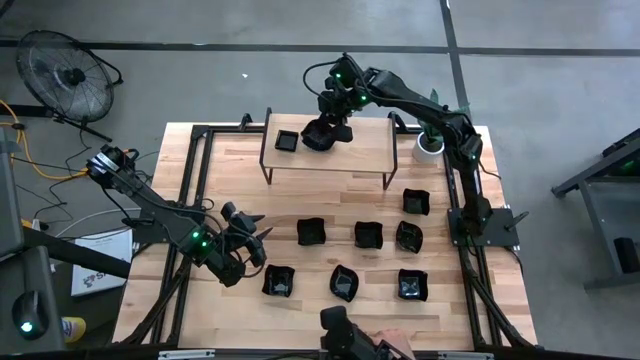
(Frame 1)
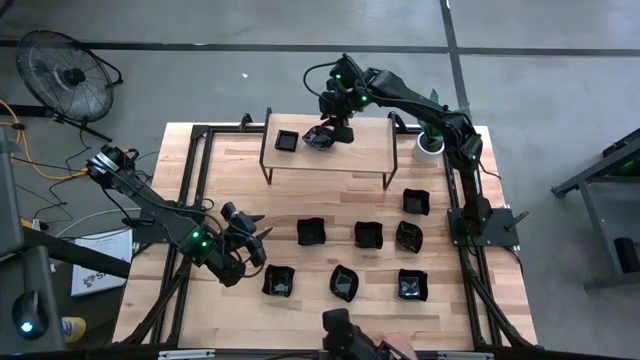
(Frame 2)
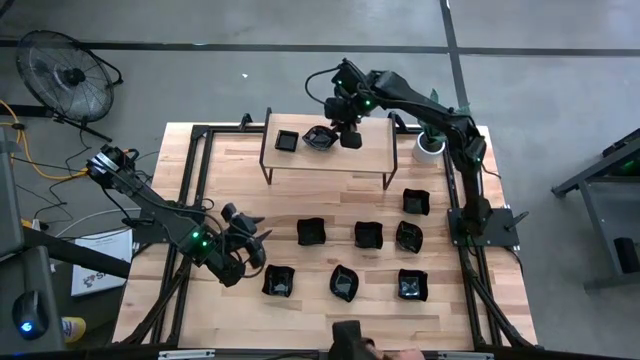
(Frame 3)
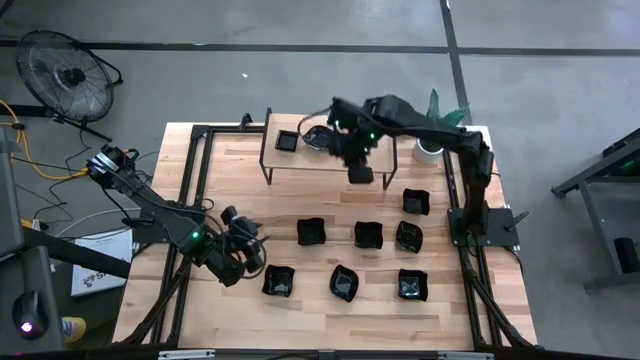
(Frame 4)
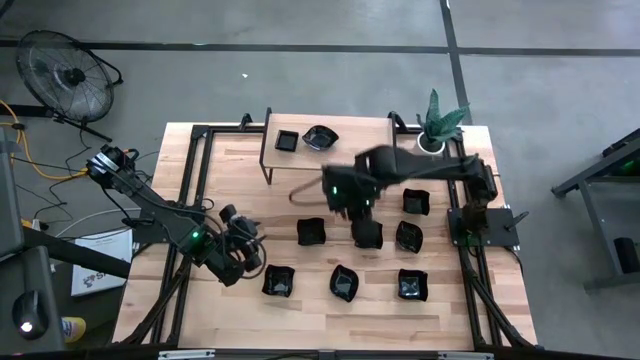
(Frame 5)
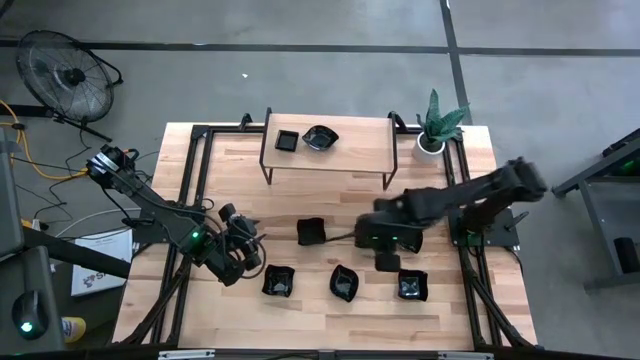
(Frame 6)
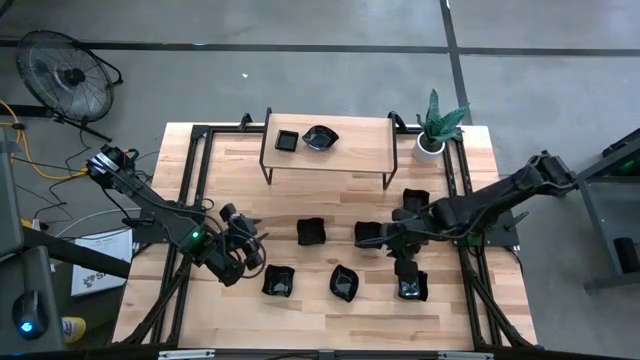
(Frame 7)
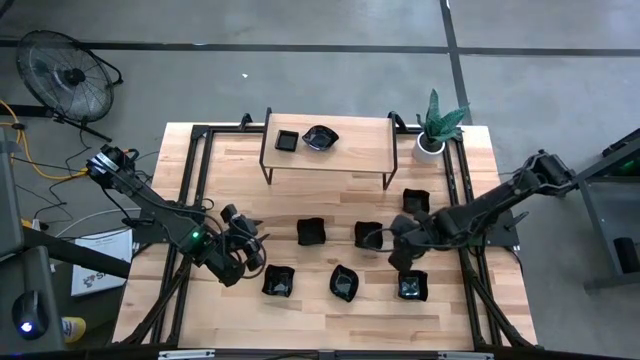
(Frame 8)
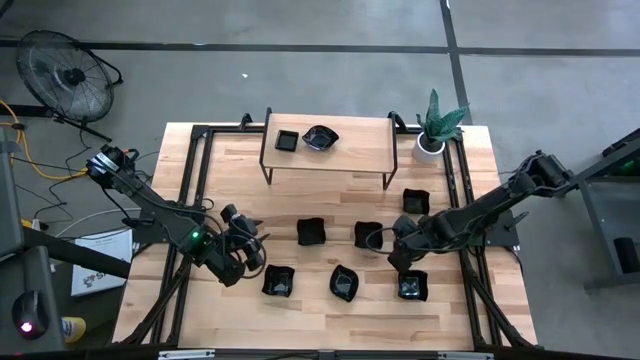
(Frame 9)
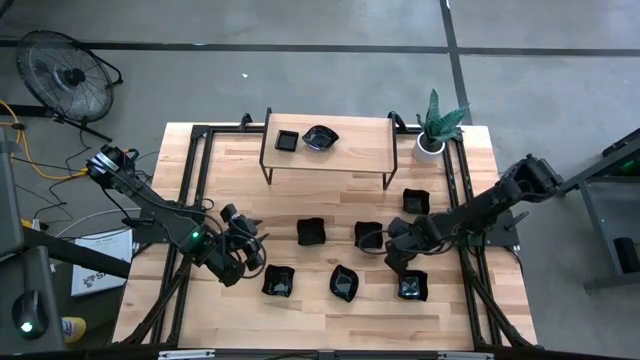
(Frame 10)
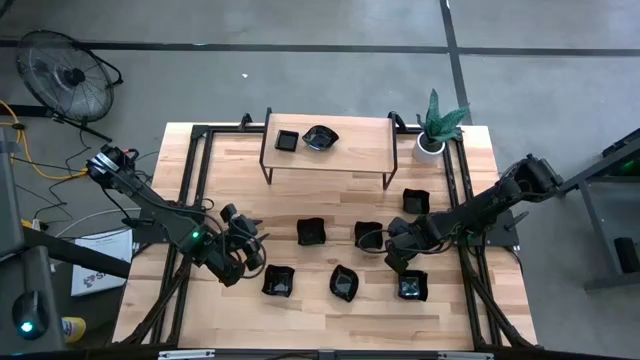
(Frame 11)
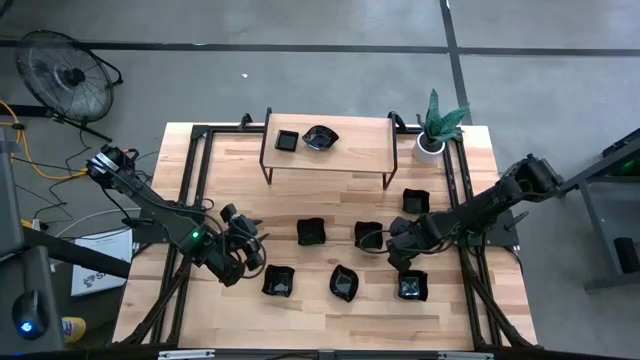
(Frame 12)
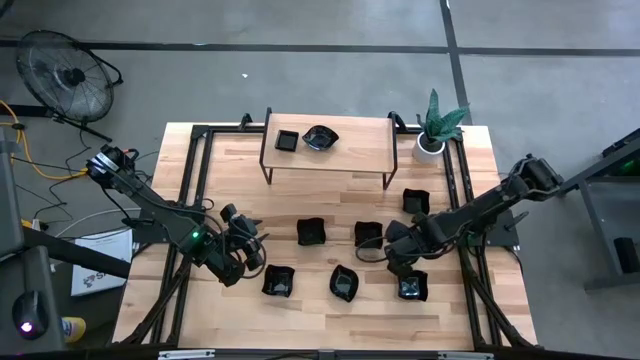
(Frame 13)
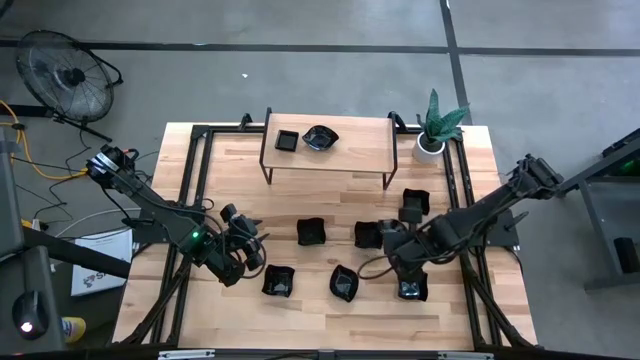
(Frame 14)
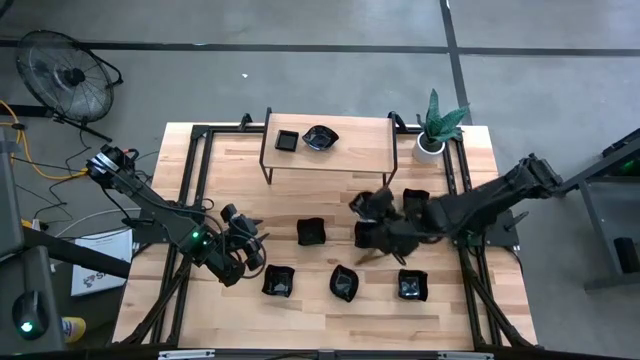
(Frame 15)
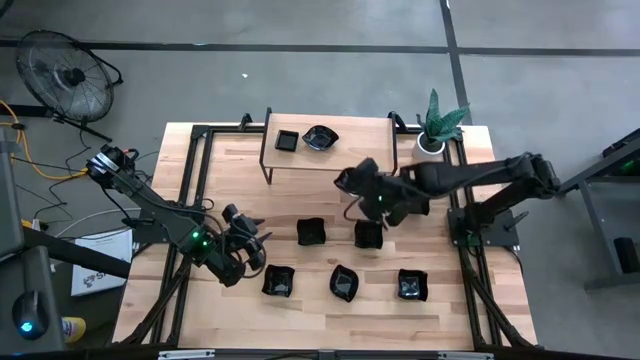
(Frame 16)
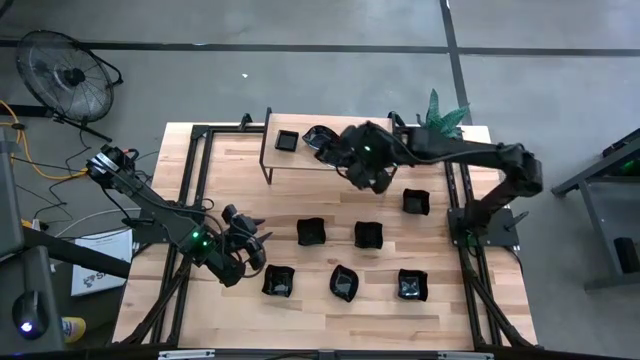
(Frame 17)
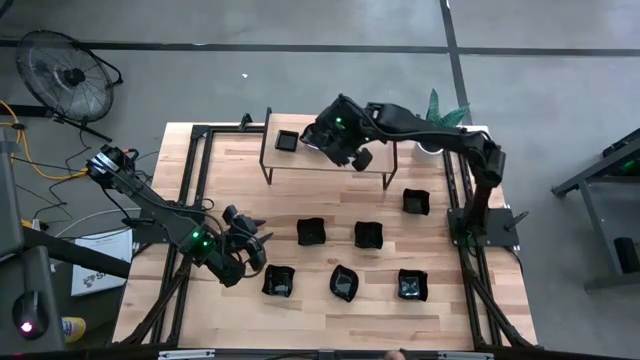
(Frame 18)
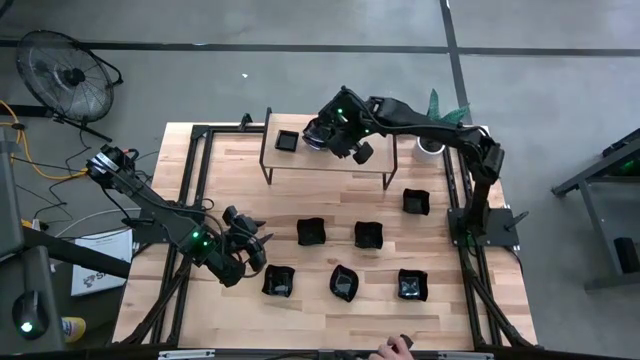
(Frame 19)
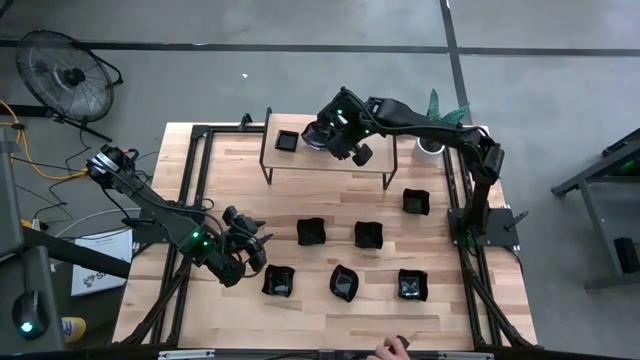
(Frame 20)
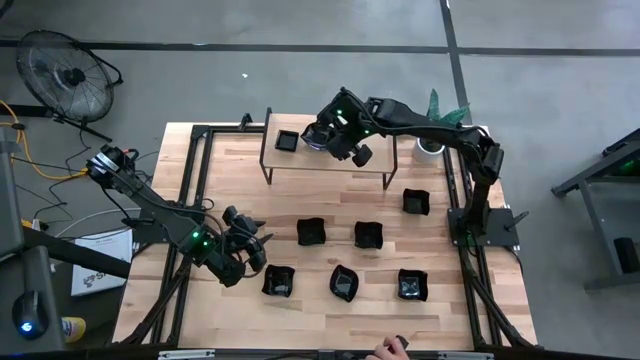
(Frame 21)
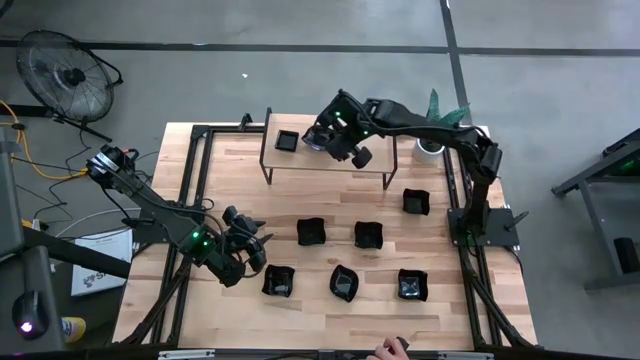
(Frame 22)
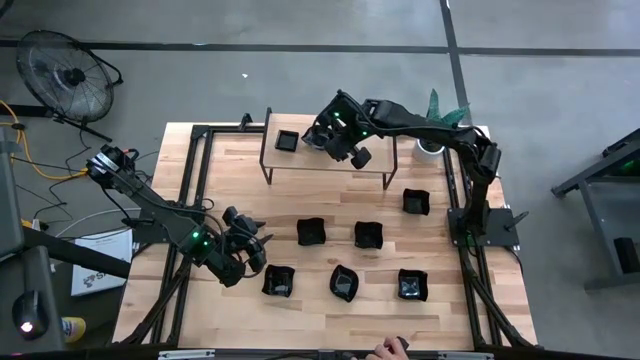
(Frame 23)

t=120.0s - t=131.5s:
Task: Pick & Place Mini shaped plates
Stack the black leaf-shaped plate on top of the stacked black leaf-shaped plates on the shelf

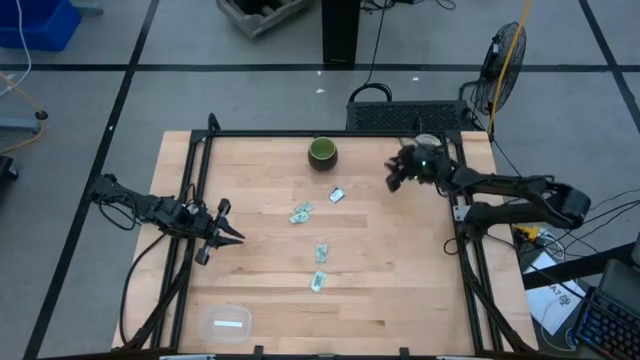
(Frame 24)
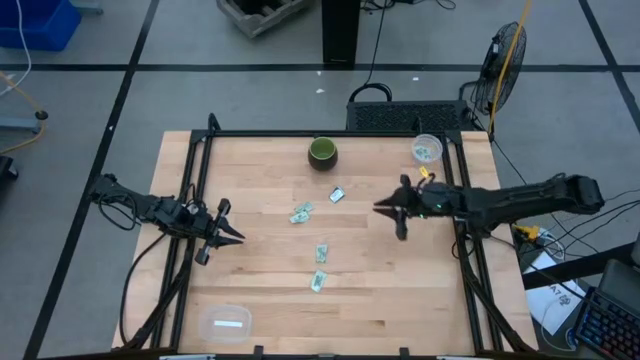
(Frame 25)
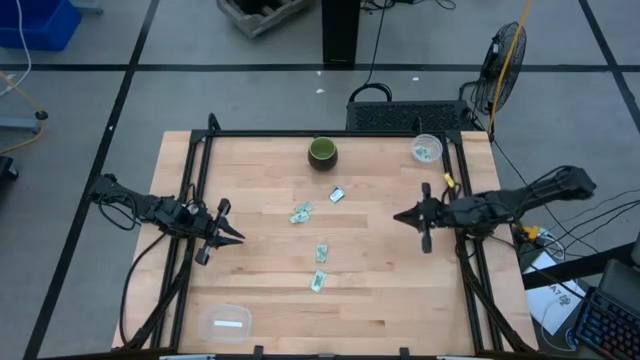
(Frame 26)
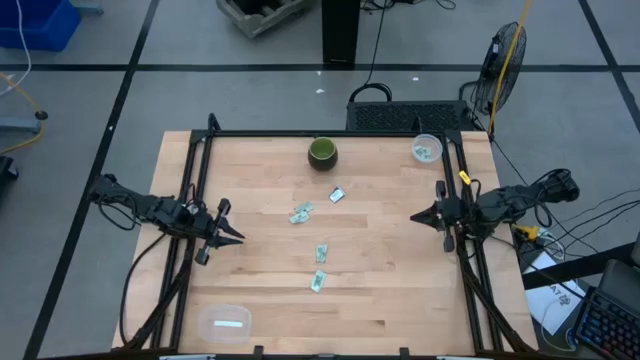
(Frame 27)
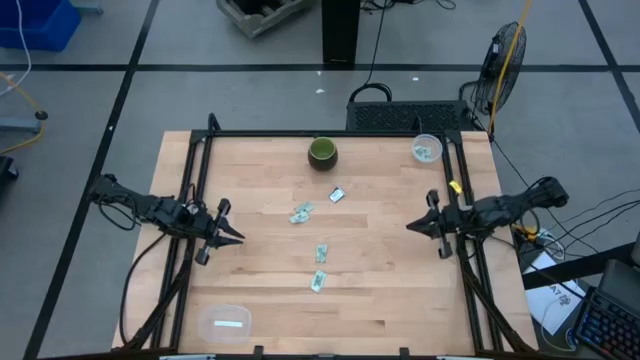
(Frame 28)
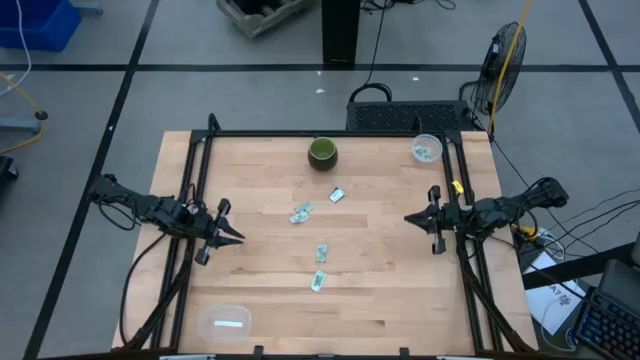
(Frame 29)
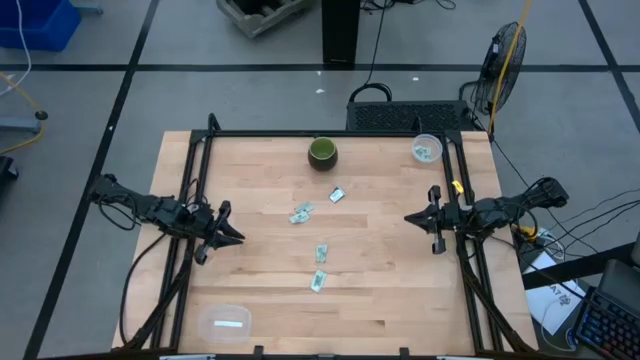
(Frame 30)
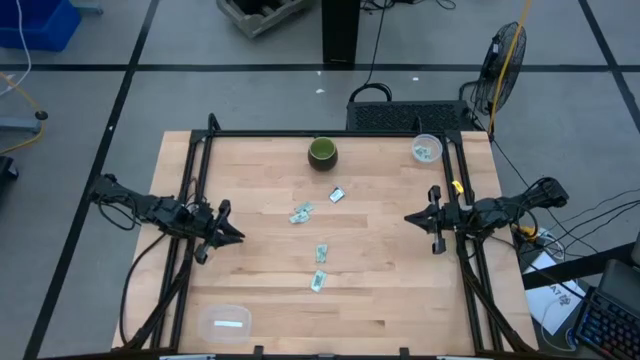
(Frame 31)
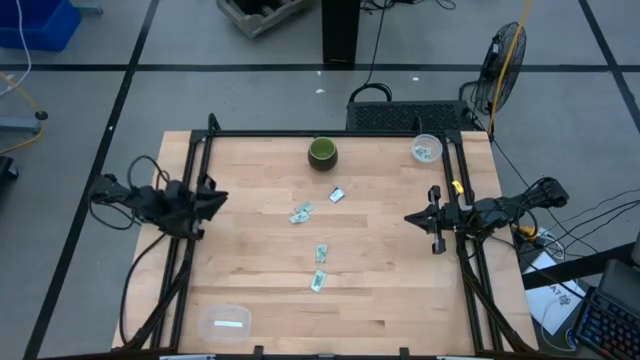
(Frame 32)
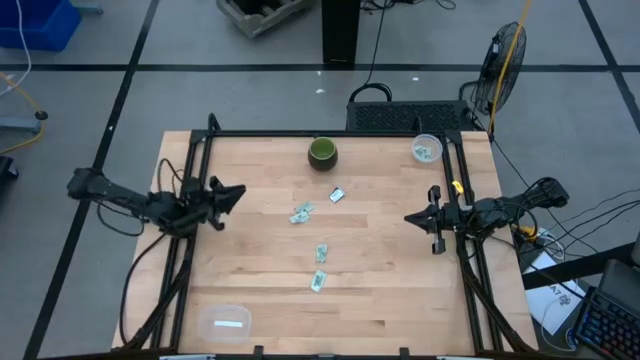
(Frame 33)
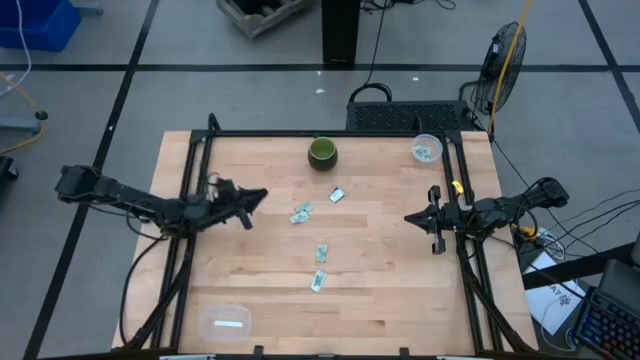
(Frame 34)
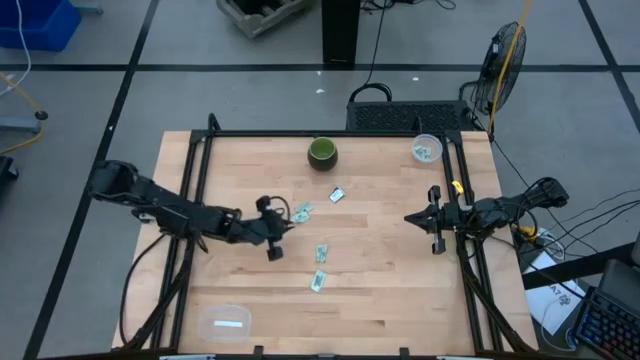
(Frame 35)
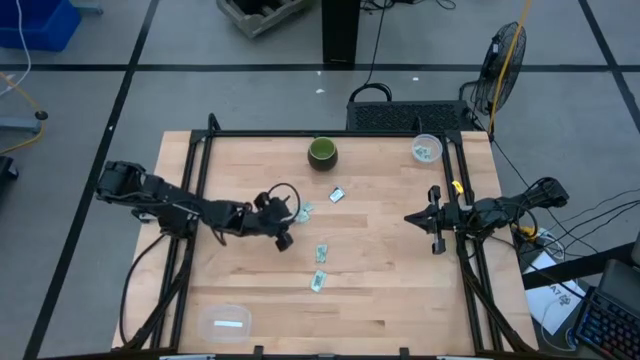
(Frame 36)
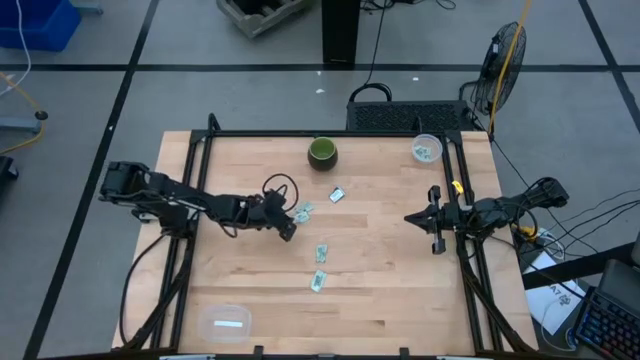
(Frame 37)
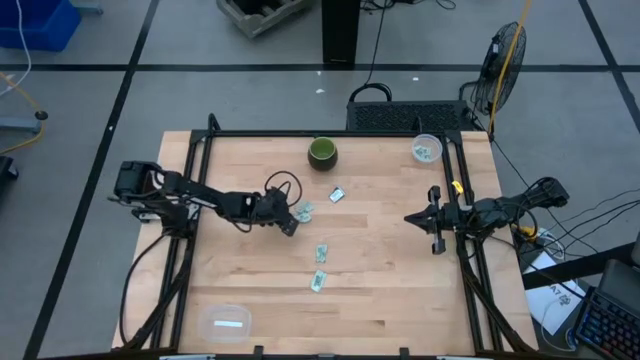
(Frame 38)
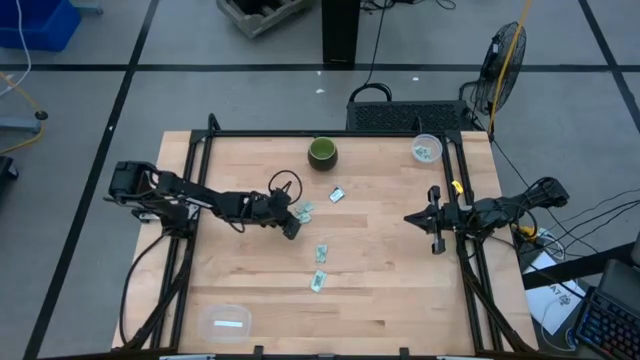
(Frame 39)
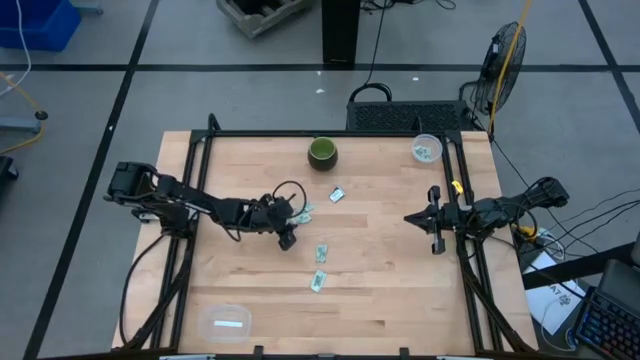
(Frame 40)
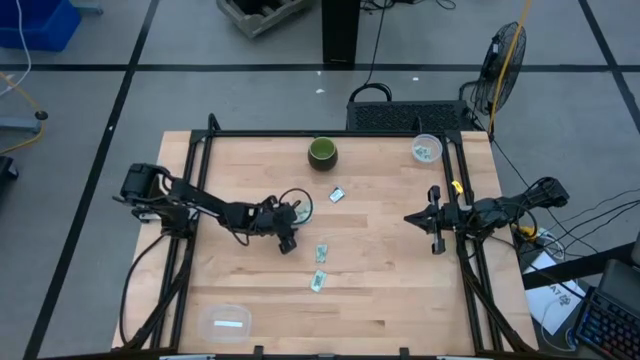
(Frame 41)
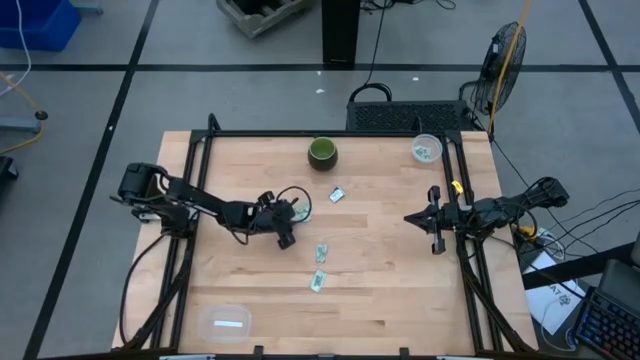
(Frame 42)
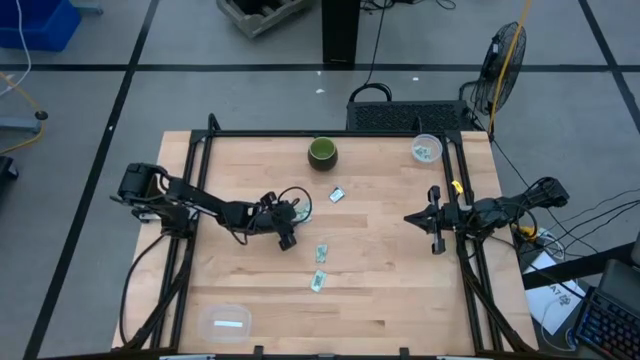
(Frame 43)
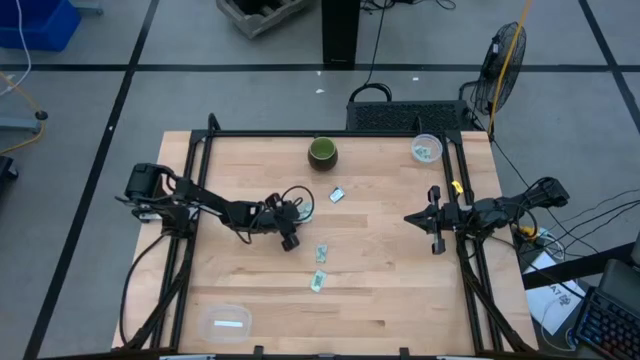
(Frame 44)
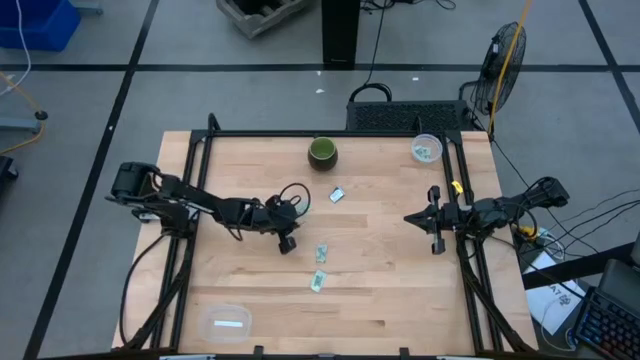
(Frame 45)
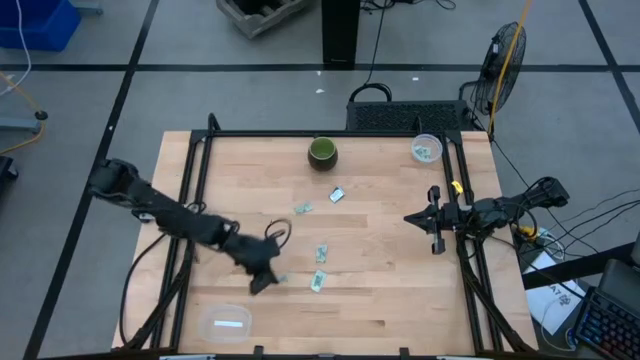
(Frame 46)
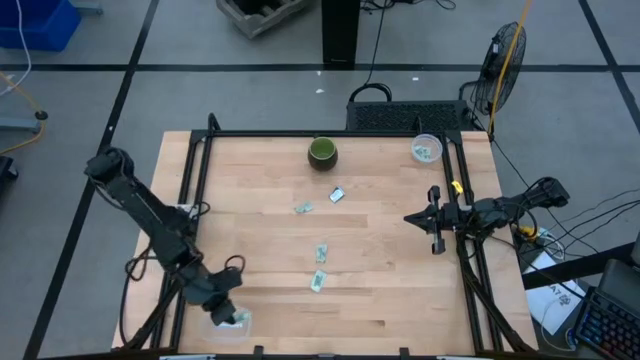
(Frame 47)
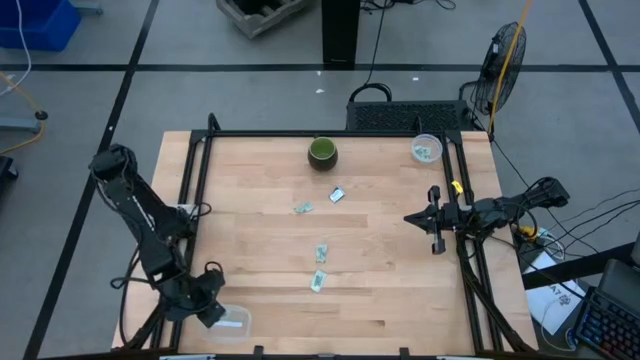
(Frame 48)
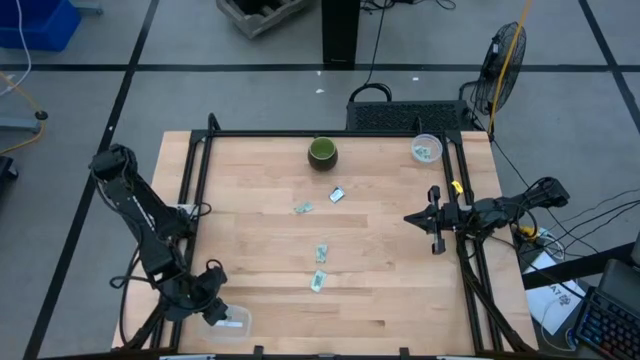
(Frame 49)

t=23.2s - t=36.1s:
Task: Pick and place items into bin
Put the stevia packet into the bottom transparent bin
